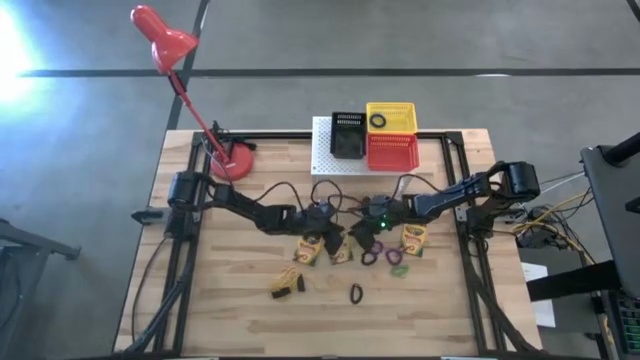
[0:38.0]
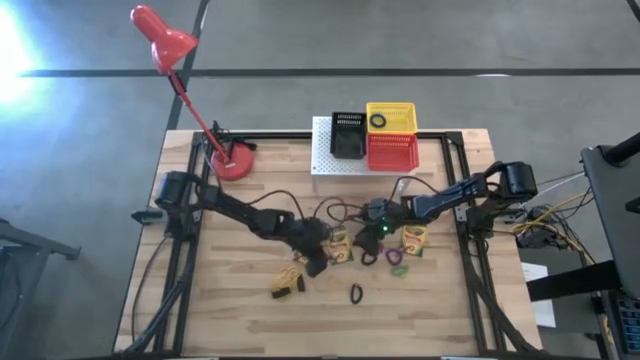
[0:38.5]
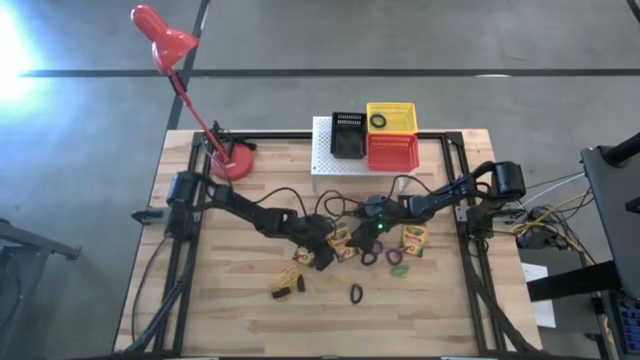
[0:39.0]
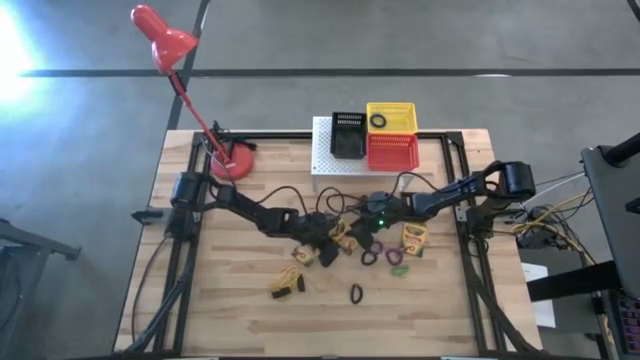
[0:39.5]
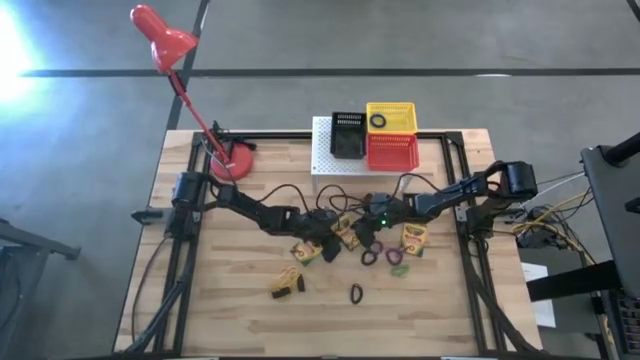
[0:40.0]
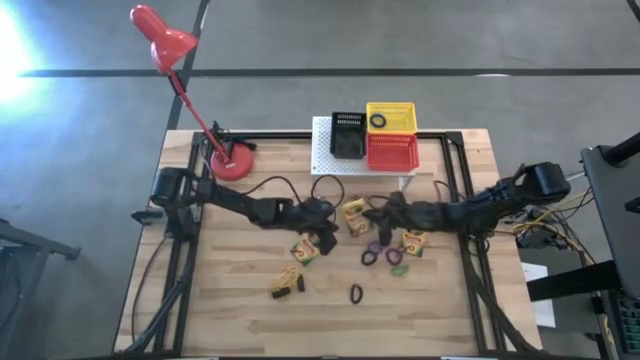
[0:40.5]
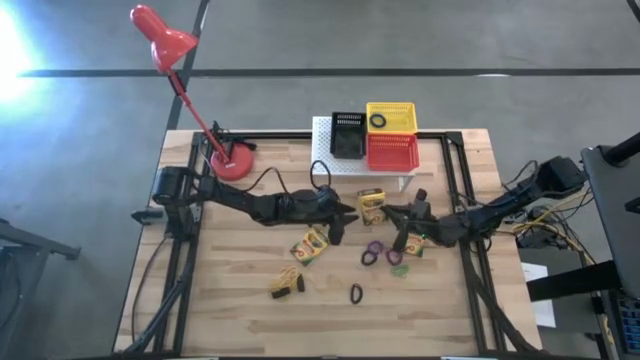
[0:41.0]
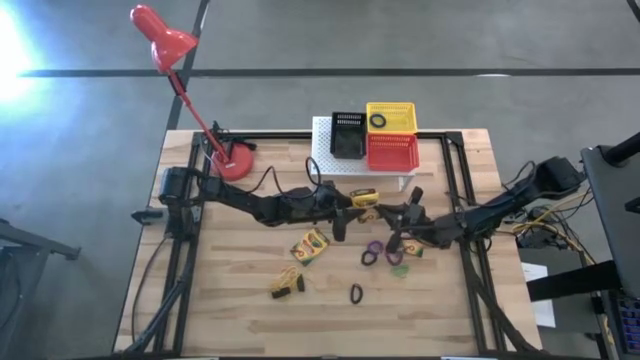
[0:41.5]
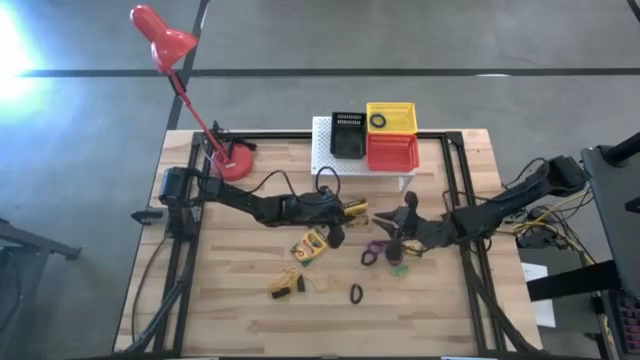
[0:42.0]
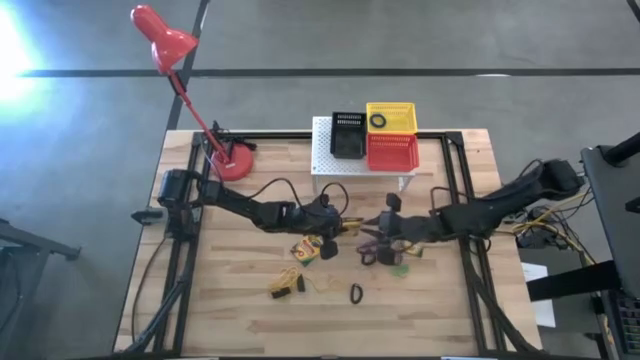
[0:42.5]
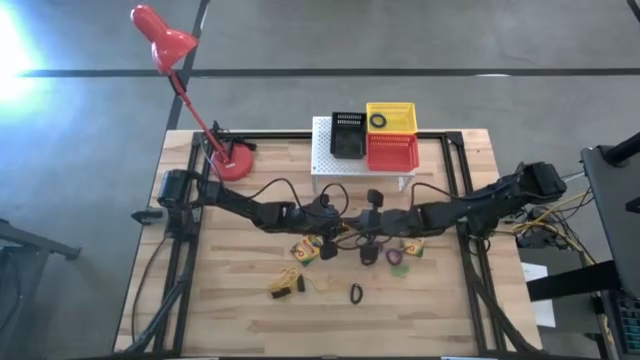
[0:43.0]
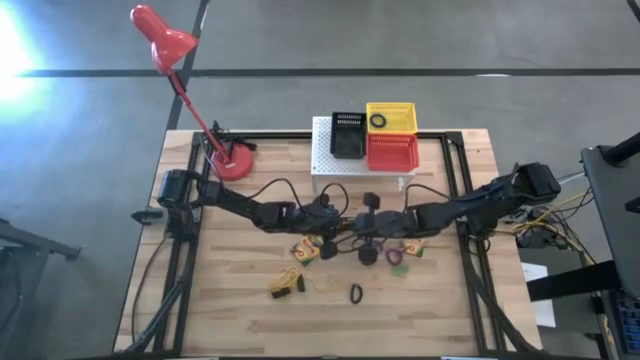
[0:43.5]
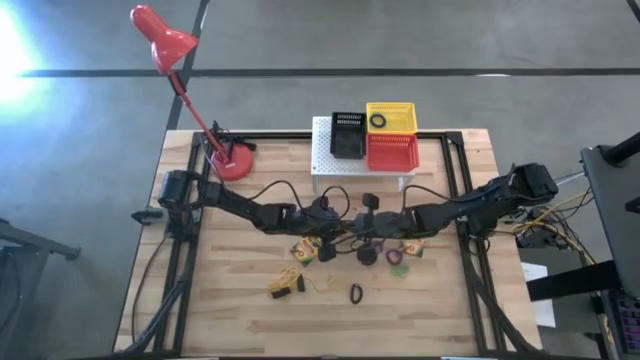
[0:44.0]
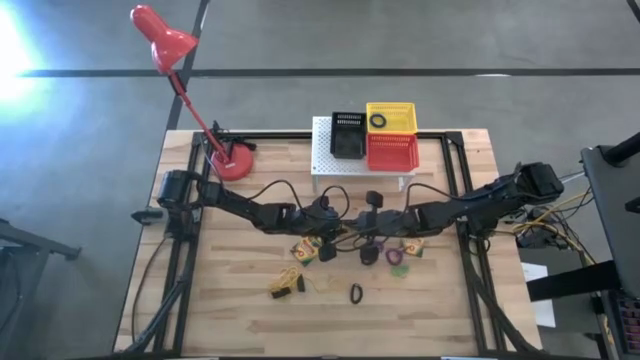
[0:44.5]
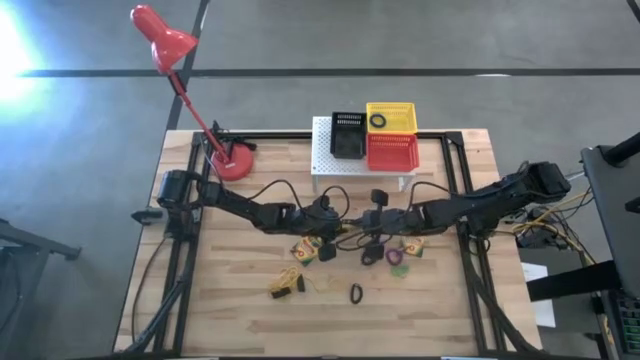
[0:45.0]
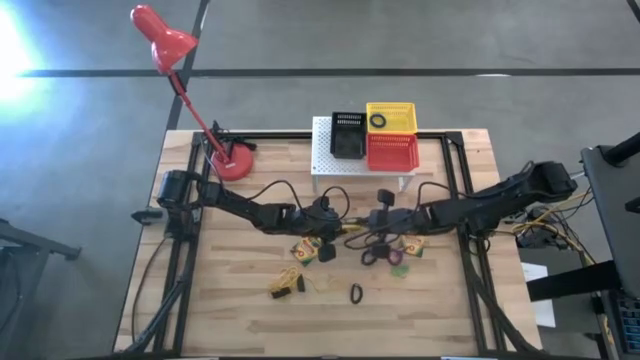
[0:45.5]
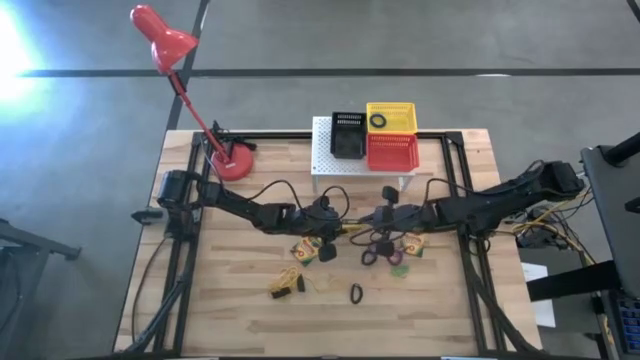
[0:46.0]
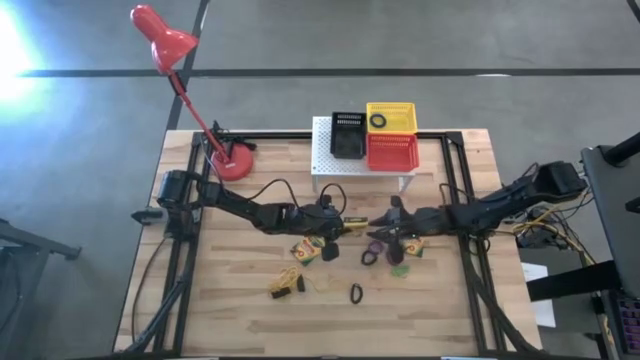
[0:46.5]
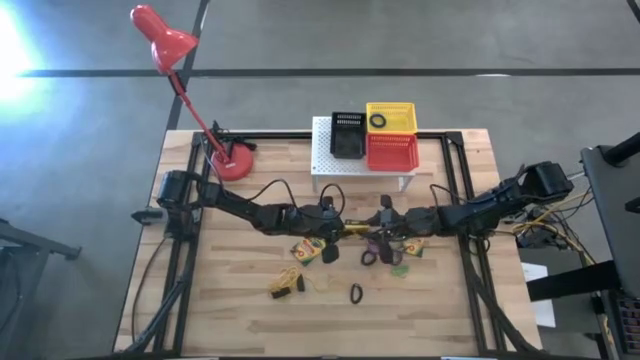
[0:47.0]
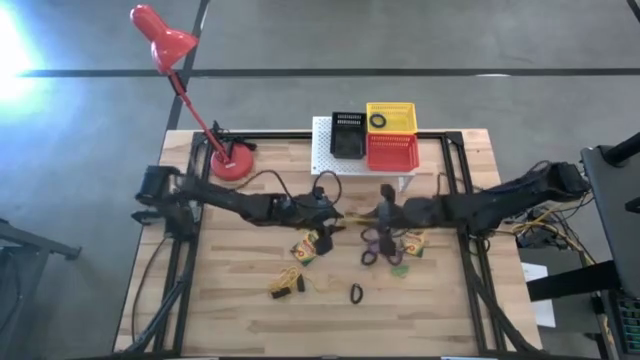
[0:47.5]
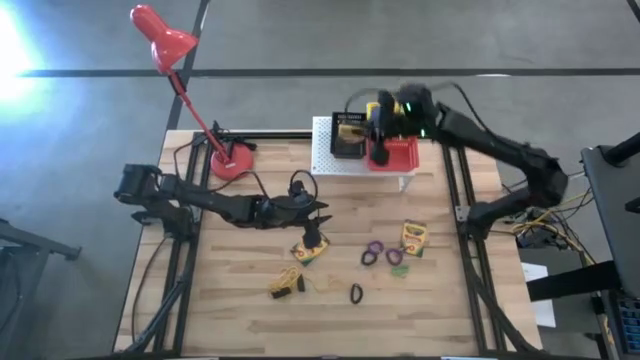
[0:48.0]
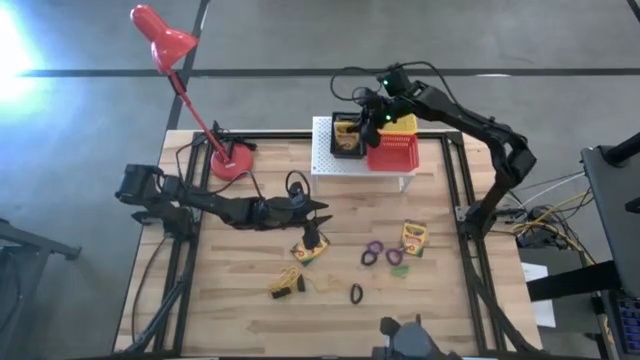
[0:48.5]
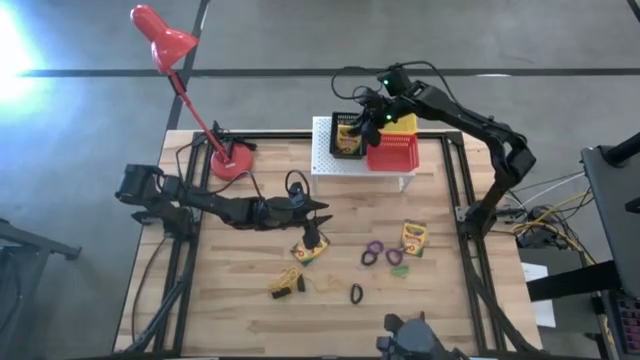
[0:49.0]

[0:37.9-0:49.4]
Task: Pick & Place Office Desk Supplies
Put the middle crayon box into the black basket on the shelf

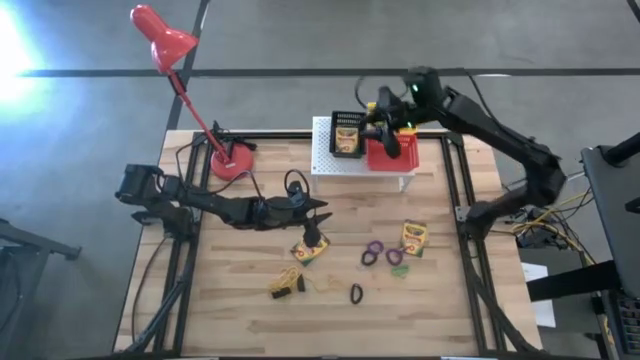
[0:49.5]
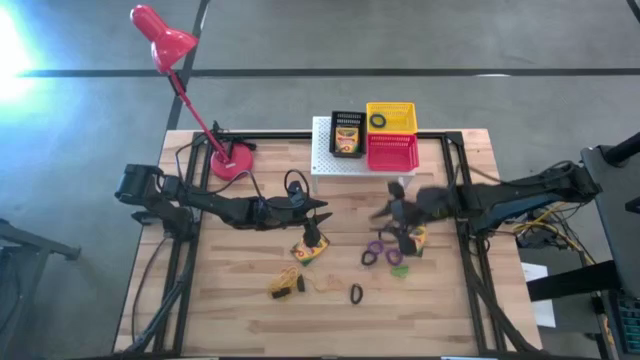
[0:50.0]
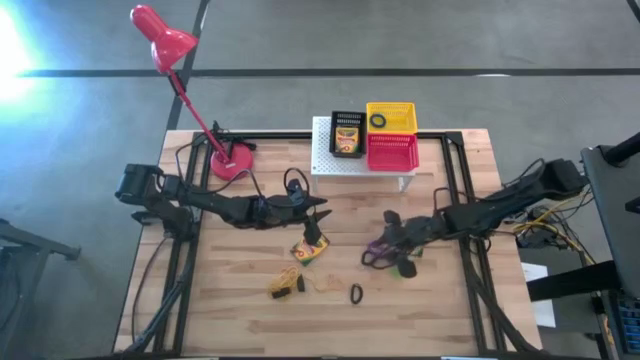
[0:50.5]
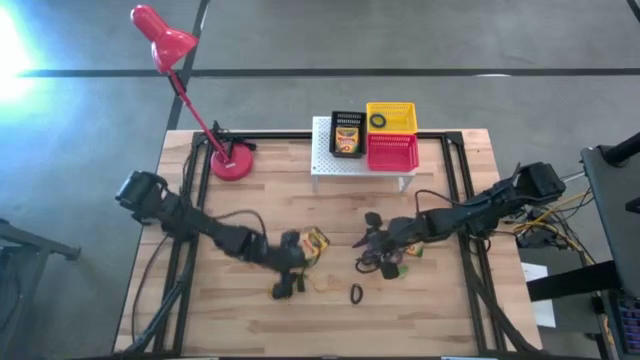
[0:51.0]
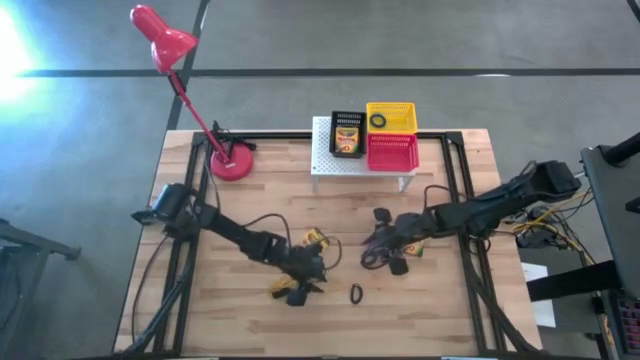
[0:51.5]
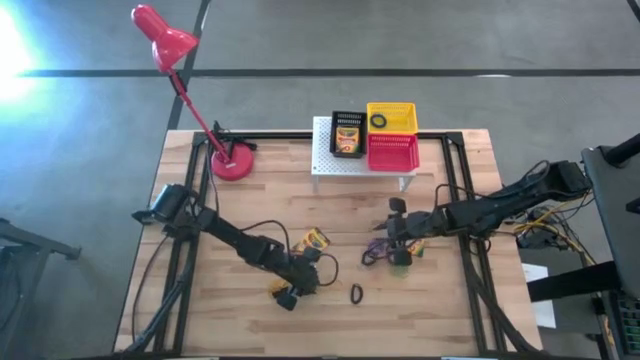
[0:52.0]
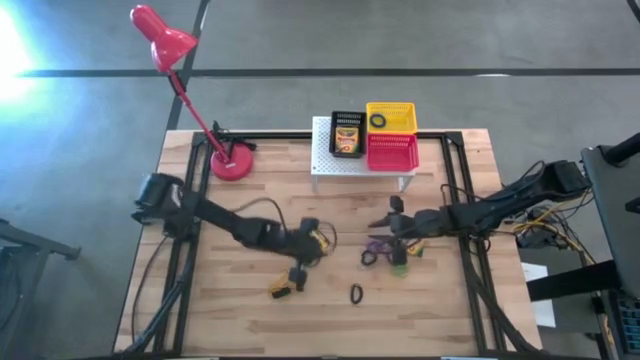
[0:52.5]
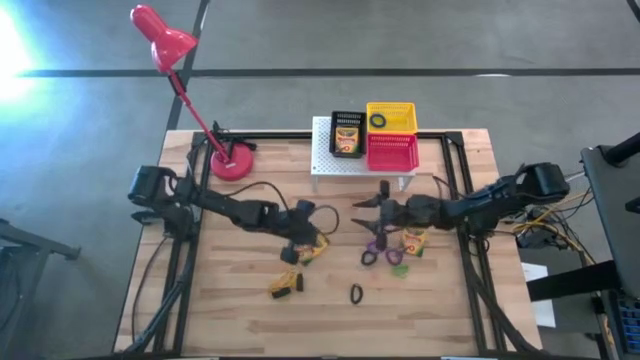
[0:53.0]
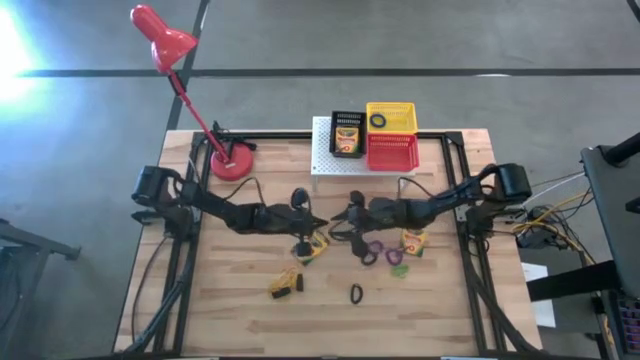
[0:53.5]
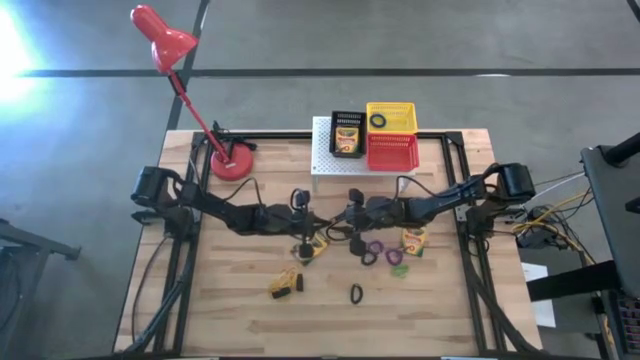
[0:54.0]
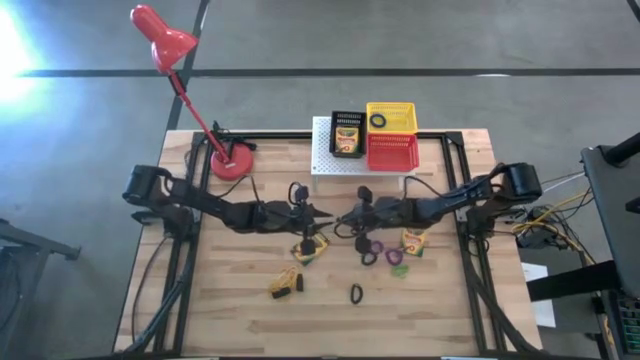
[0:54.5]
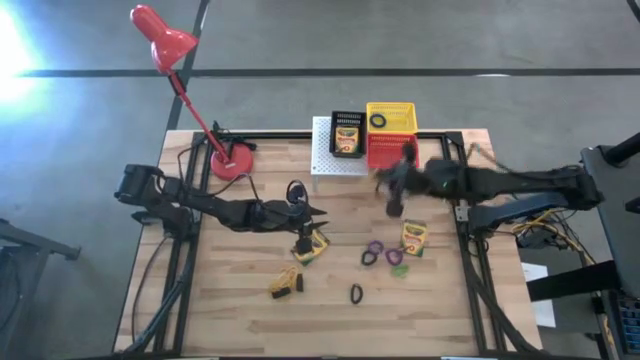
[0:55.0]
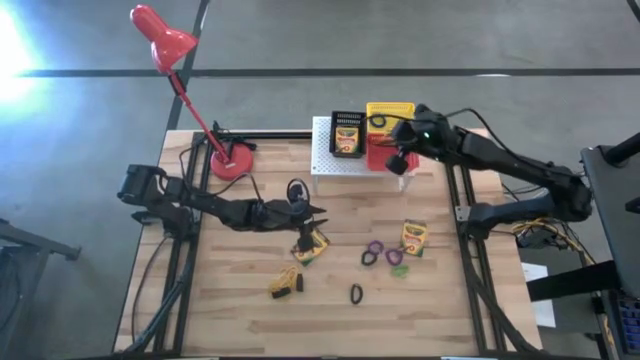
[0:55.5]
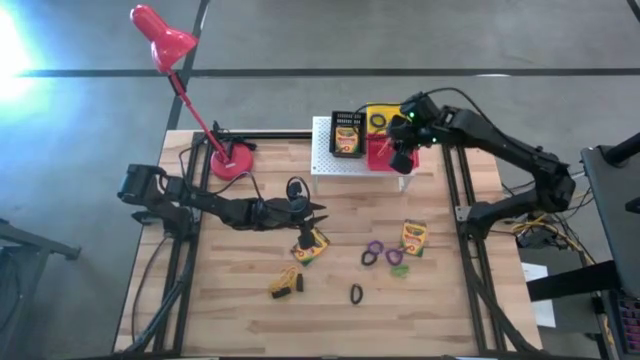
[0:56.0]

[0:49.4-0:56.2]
Put the yellow rubber band into the red basket on the shelf

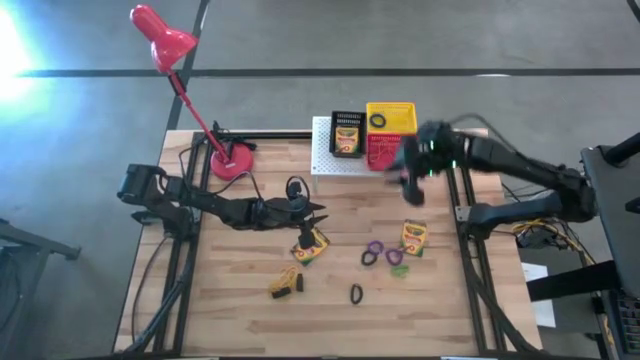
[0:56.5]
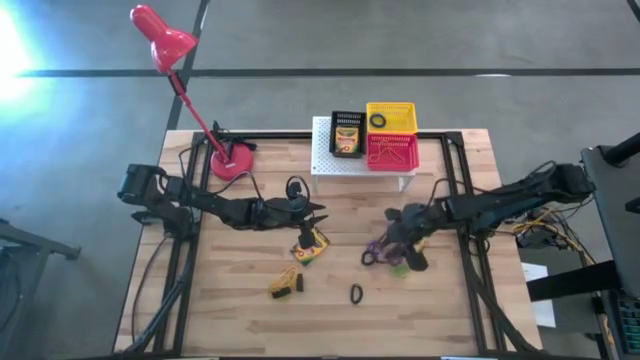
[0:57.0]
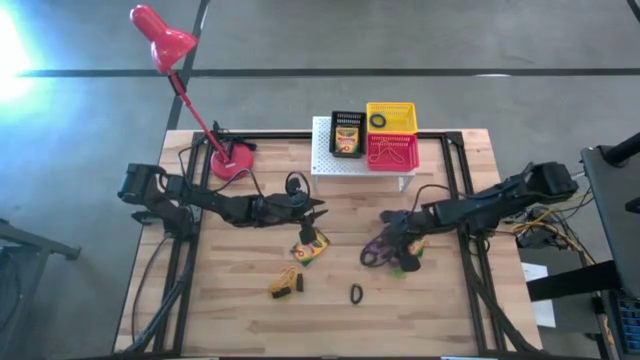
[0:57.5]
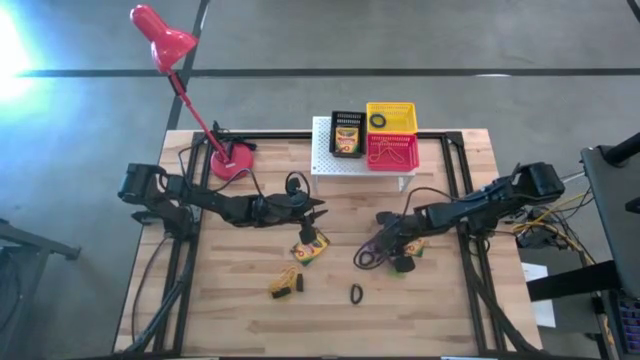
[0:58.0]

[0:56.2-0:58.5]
Put the right violet spring keychain into the yellow basket on the shelf

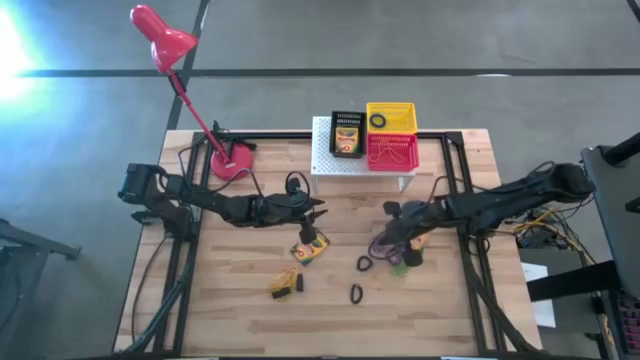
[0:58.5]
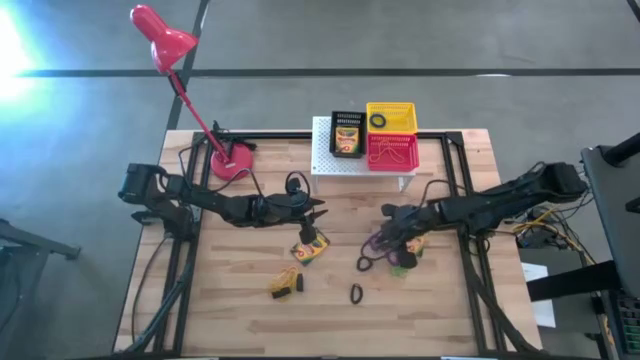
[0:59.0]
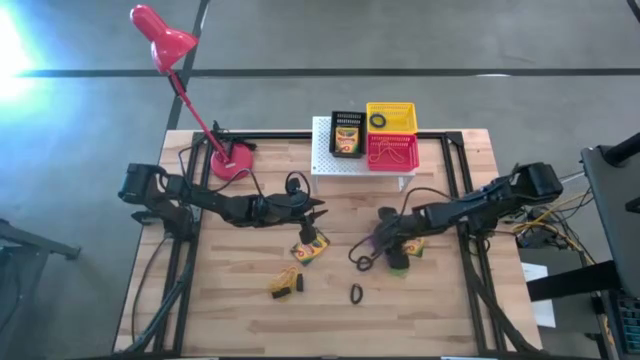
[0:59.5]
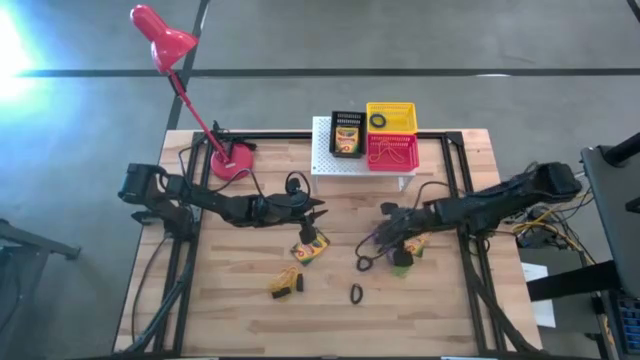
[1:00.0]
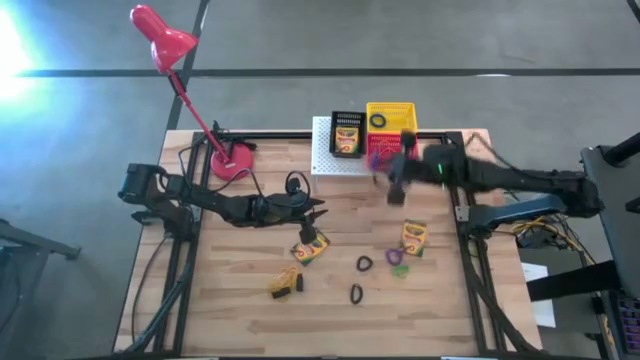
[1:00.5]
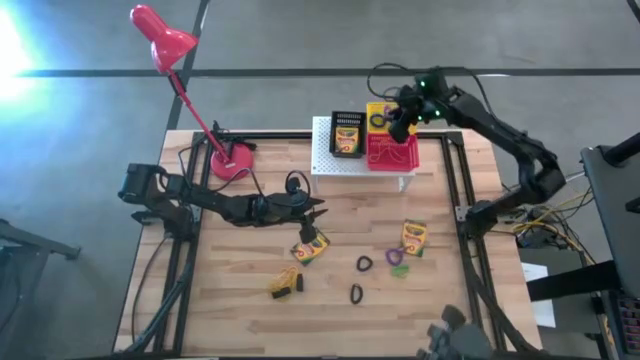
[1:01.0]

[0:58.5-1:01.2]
Put the right violet spring keychain into the yellow basket on the shelf
